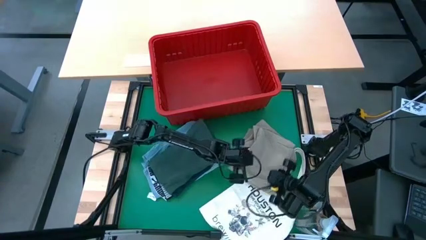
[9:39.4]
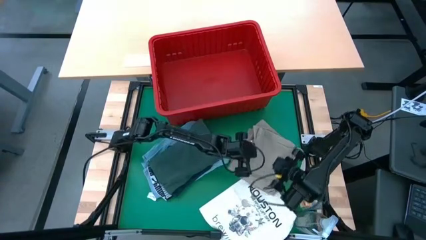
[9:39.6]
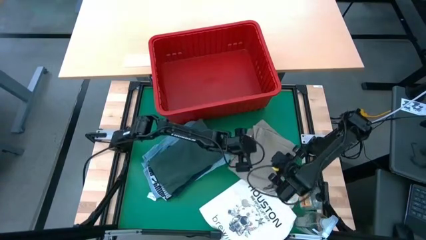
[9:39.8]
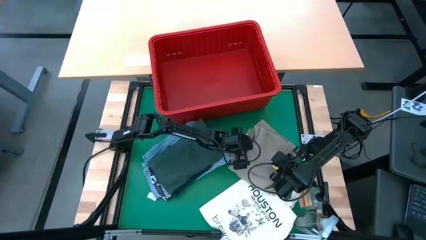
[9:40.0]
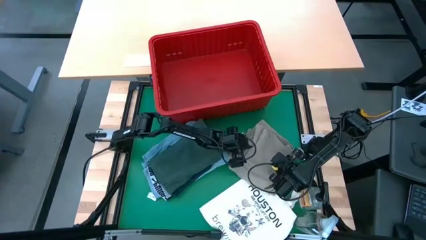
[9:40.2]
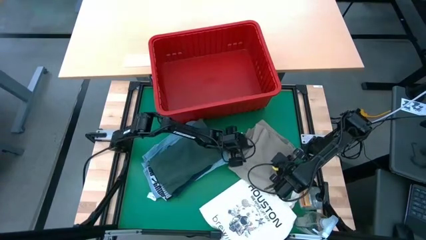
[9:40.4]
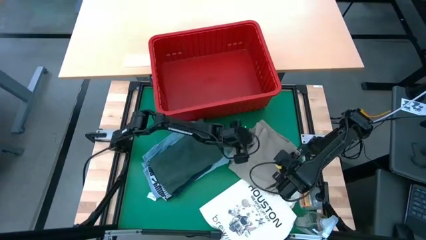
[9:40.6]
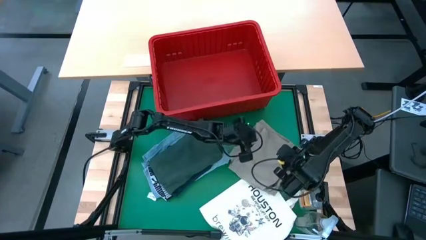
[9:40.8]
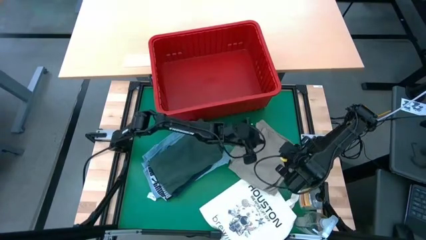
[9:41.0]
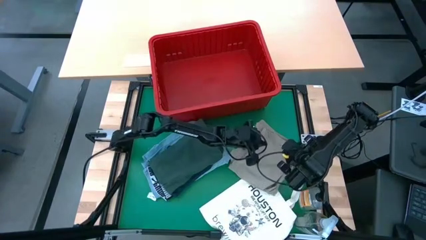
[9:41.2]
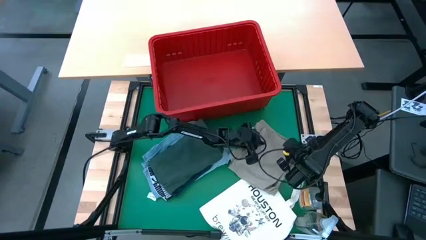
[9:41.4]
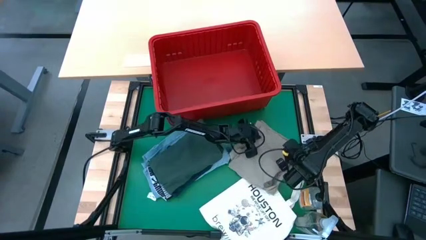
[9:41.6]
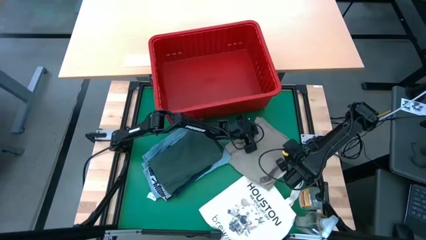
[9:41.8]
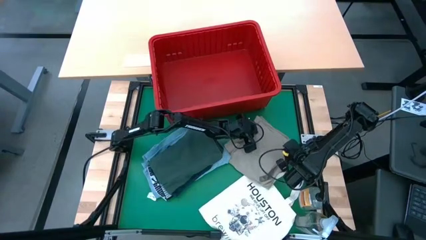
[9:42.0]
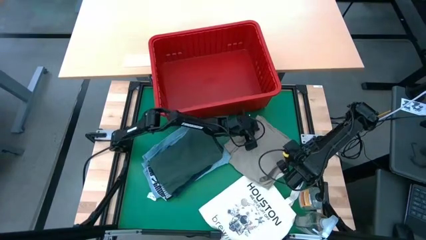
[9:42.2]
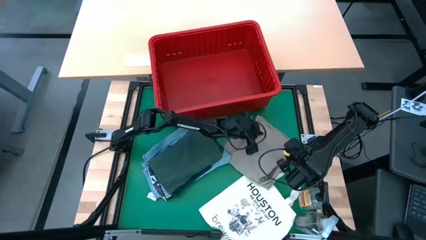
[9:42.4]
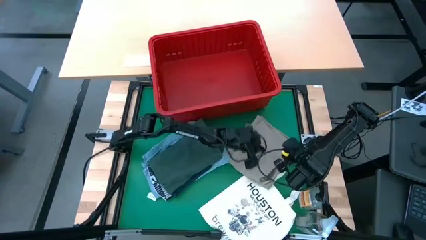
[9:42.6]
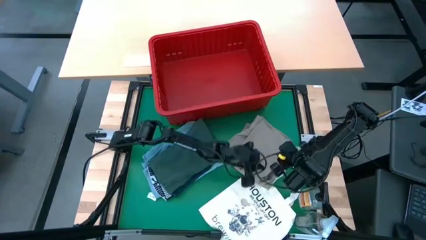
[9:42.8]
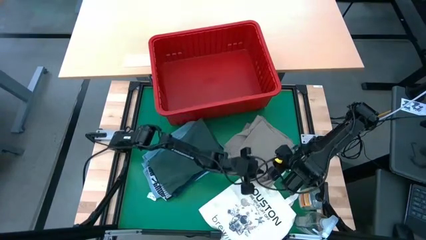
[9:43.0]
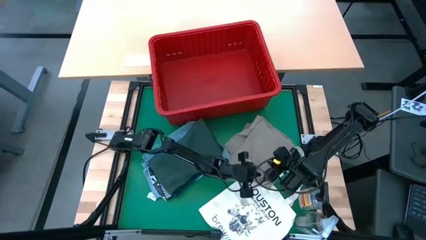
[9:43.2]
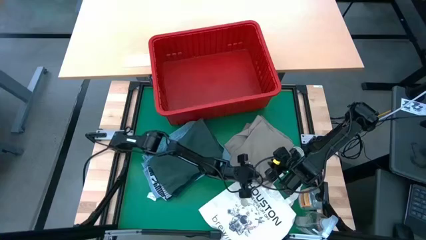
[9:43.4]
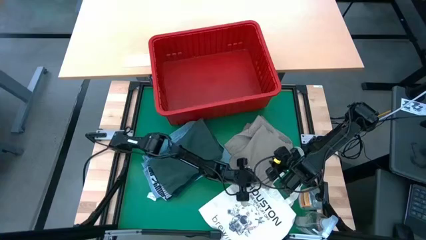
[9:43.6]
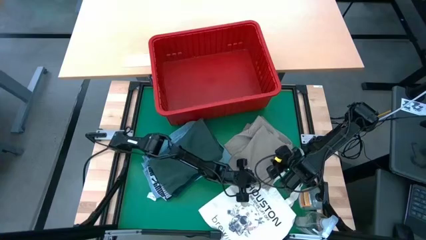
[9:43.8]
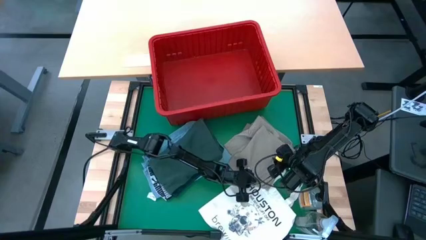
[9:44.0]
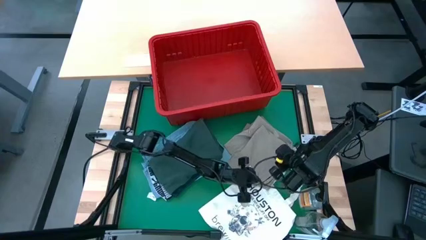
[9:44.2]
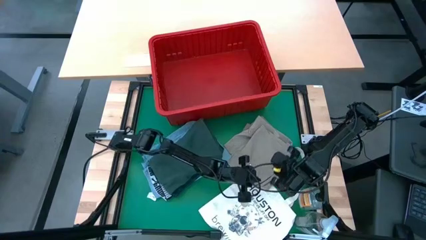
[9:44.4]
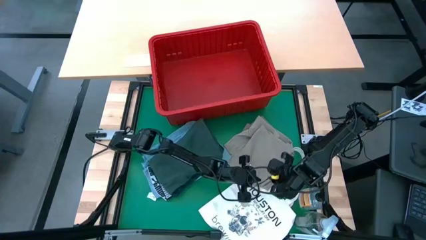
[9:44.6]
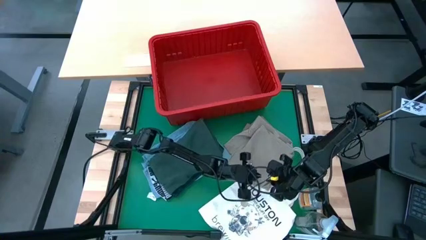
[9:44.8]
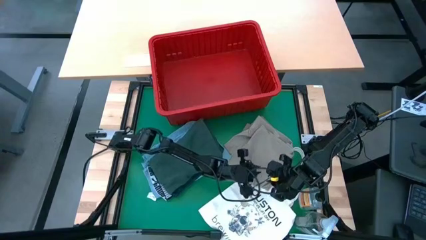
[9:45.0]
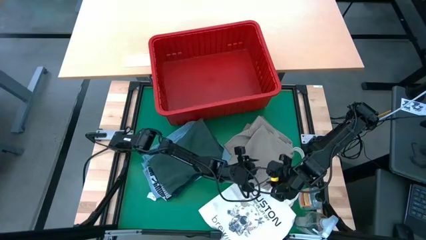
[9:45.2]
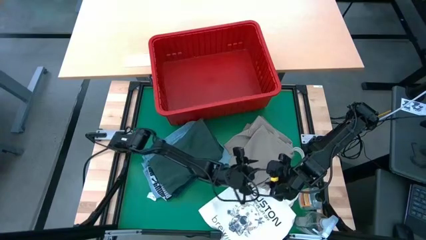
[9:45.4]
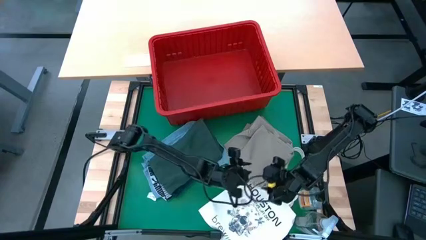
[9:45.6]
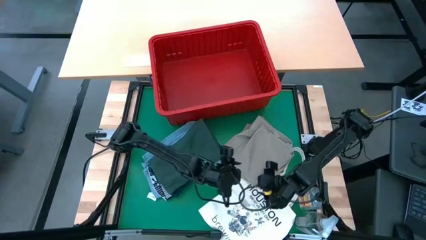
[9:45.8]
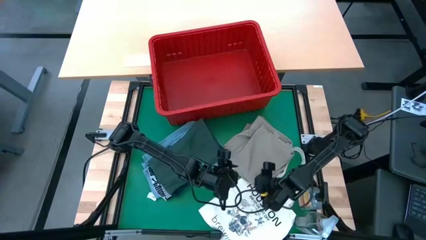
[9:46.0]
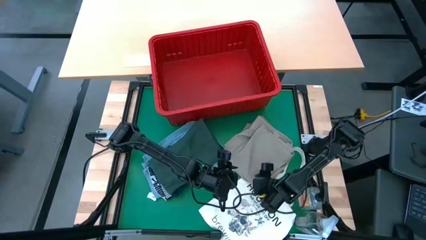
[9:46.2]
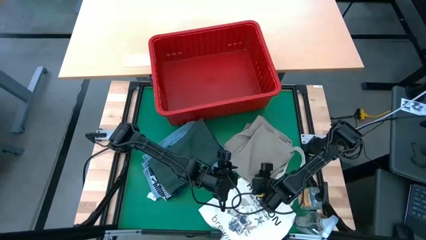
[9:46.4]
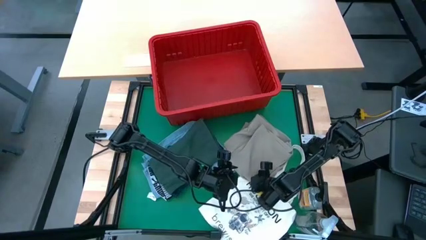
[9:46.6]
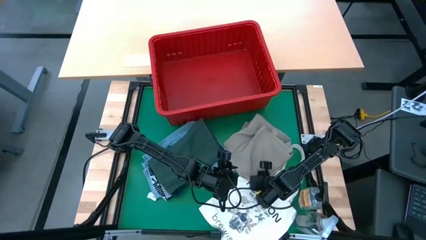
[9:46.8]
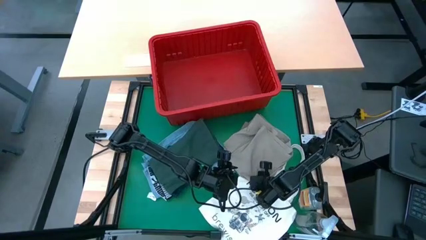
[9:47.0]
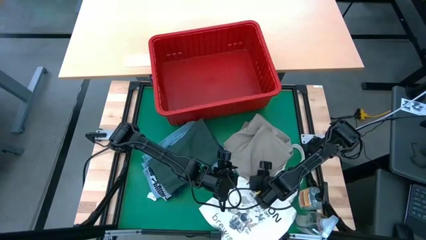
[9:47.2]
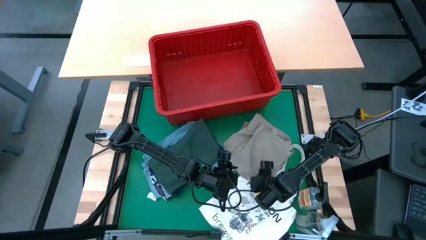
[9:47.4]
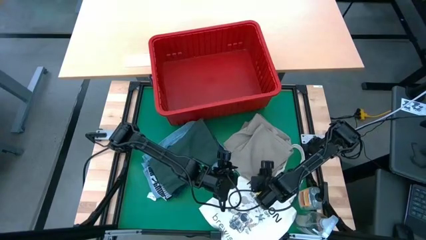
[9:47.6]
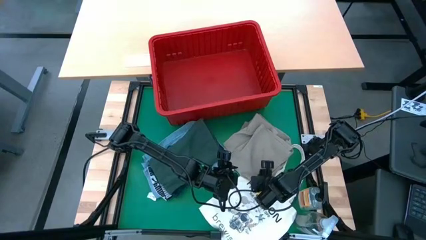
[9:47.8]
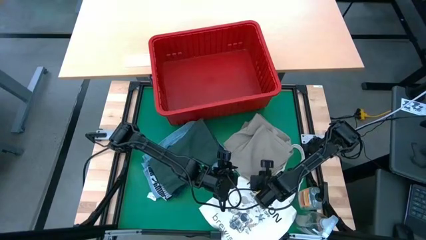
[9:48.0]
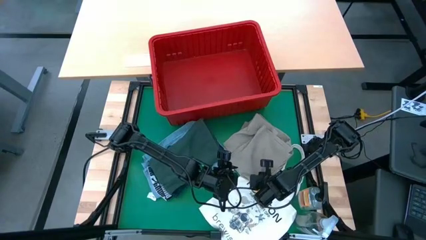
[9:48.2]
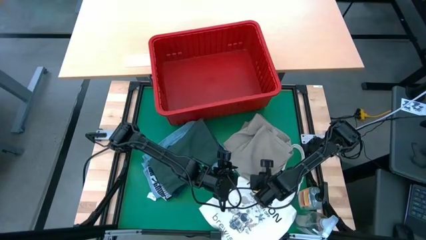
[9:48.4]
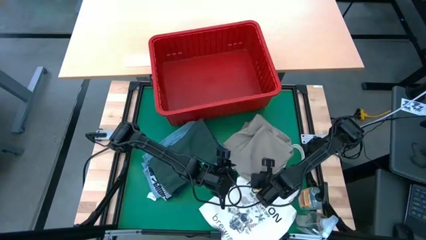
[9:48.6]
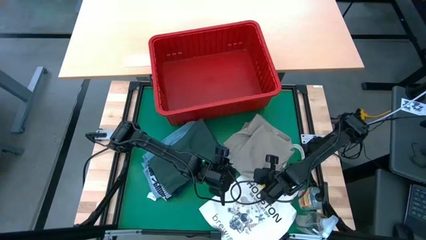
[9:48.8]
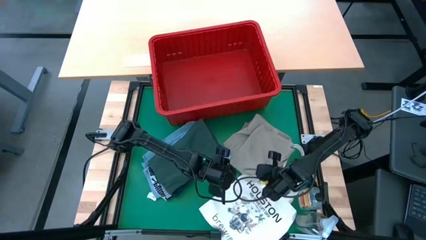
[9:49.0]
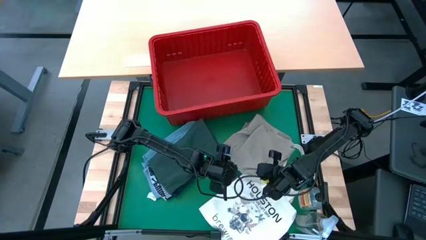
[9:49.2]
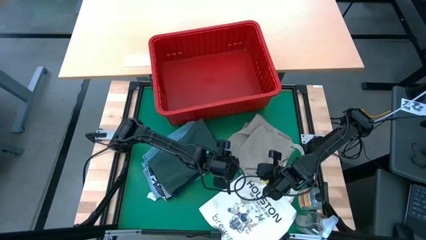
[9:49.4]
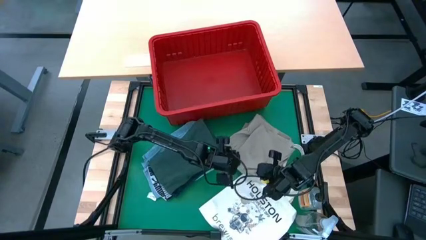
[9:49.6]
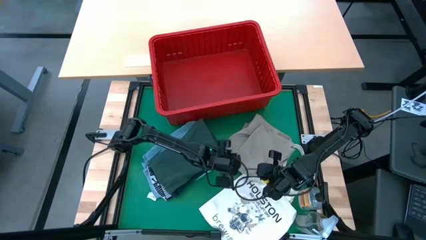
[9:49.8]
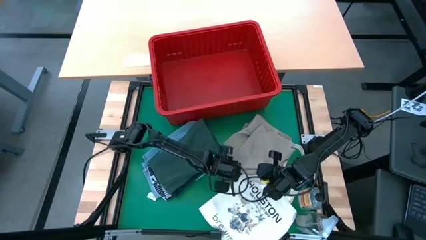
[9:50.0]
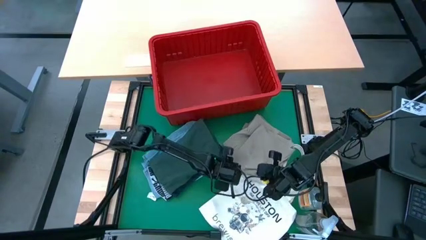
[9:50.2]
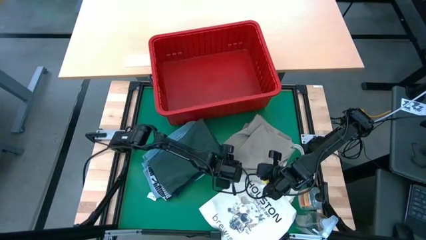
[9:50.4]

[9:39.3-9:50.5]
Task: Fold Laundry from Bin
Stack the light brown shorts on top of the dark green shirt

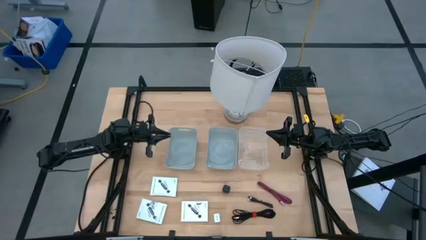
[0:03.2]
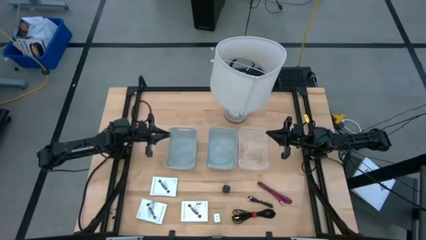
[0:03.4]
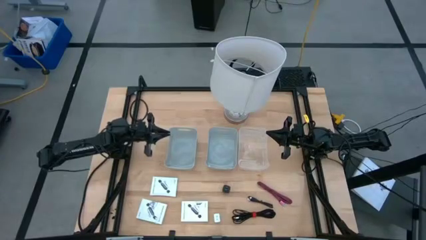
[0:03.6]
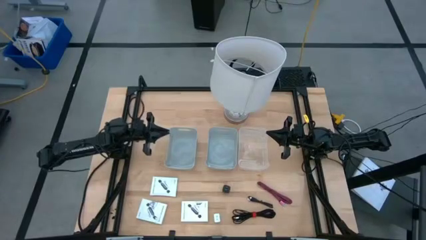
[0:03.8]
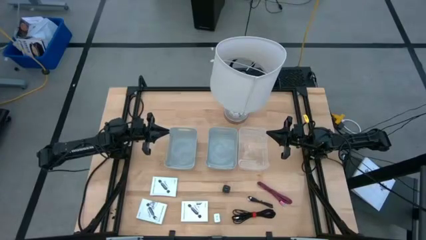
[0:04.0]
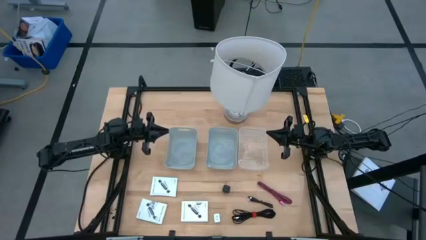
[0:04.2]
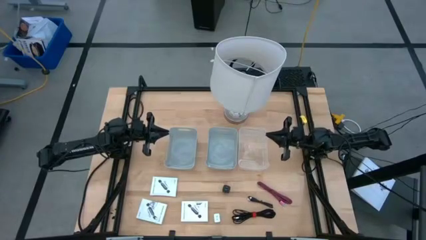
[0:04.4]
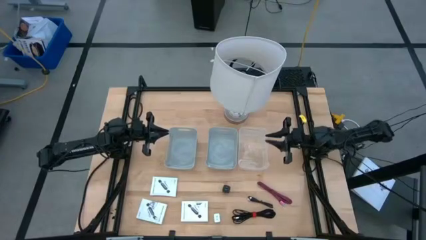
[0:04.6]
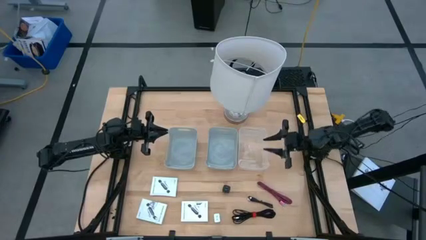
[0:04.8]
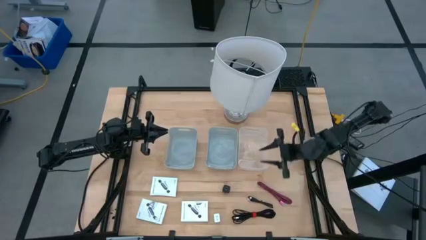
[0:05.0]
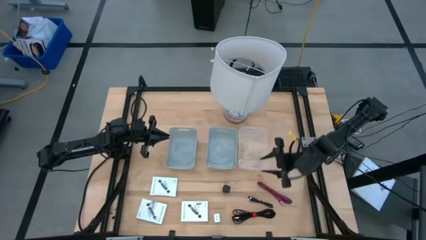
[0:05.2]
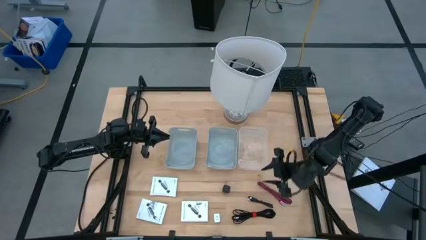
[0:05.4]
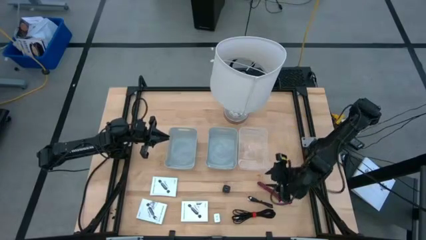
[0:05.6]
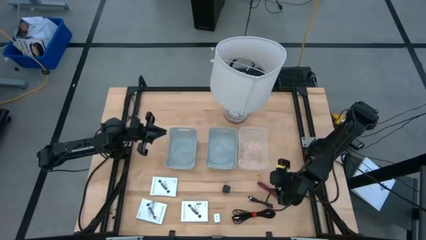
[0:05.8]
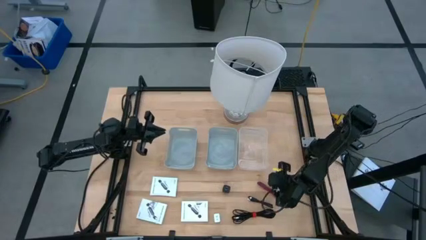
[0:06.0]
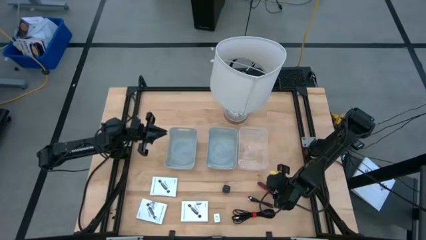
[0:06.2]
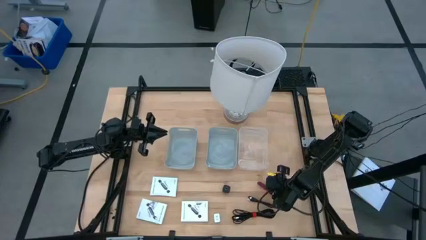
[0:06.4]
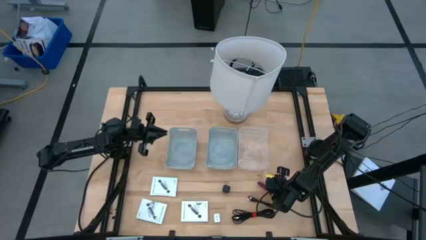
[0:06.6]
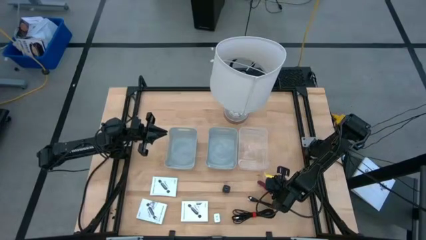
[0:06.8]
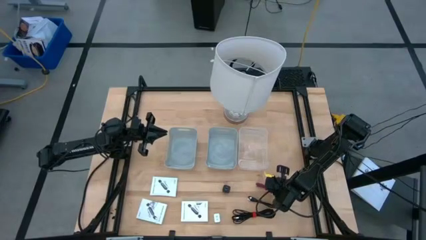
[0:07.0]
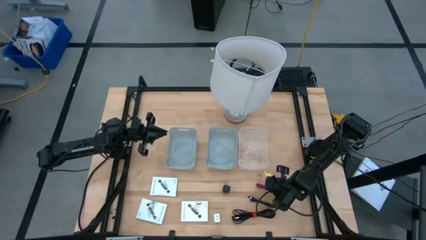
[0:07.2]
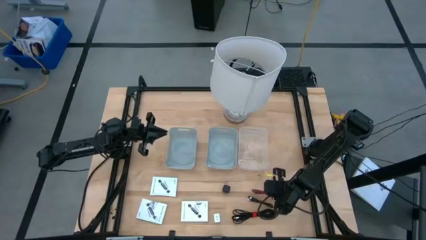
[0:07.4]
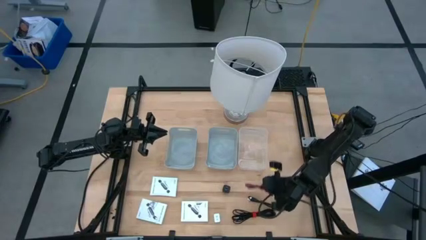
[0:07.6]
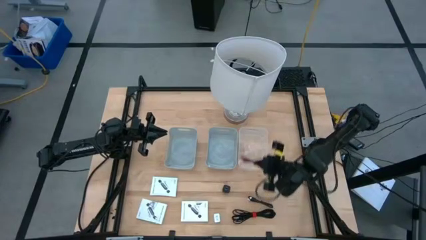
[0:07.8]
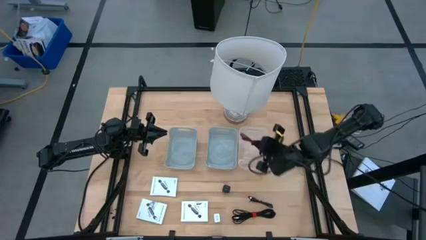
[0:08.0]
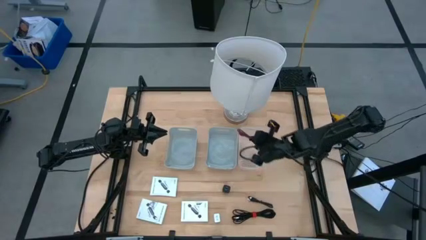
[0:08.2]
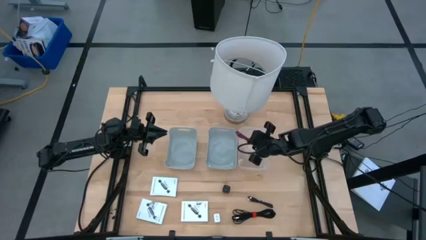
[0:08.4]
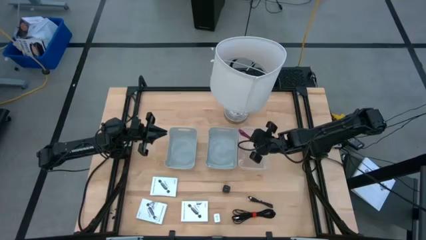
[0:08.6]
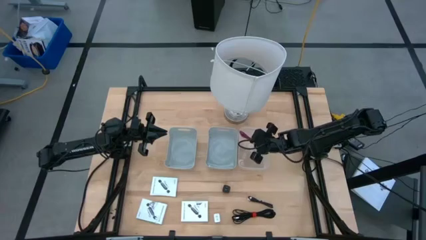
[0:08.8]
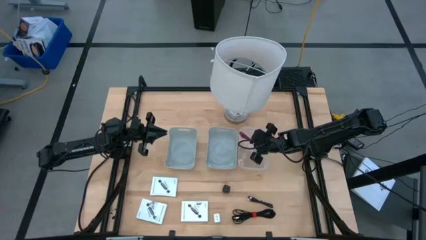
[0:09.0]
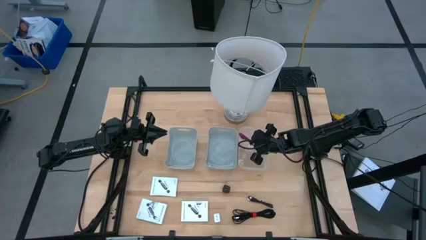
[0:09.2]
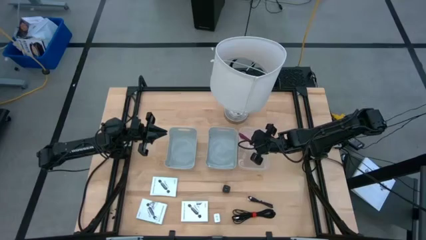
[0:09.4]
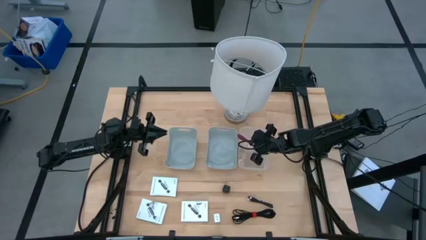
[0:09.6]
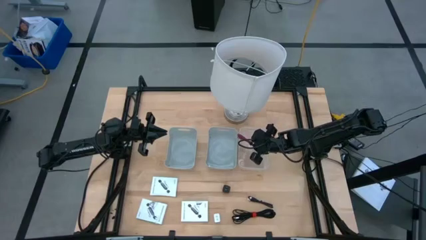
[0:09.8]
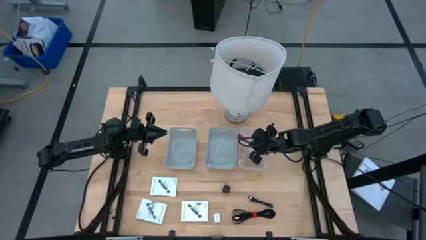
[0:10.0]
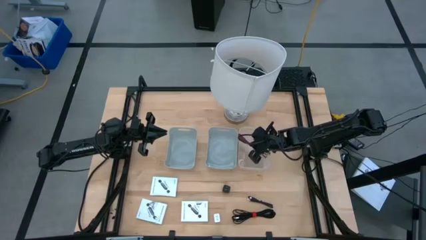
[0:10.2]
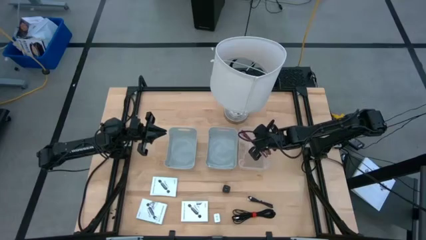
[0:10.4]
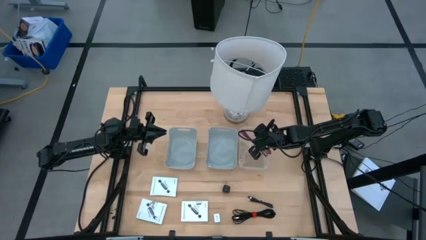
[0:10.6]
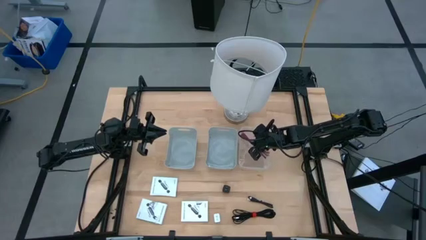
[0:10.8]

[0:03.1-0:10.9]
Task: Pick and place items into bin
Put the red charger cable into the transparent bin
